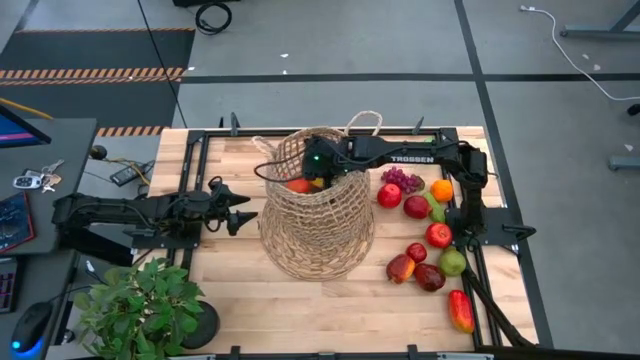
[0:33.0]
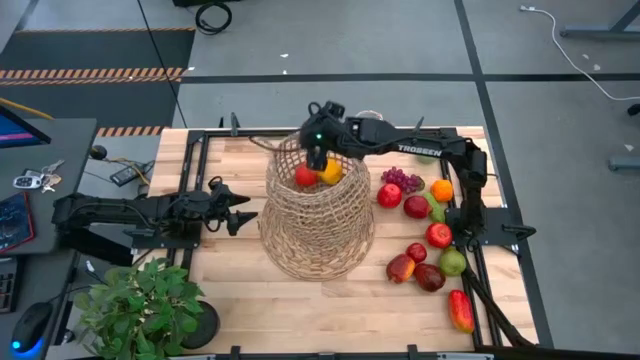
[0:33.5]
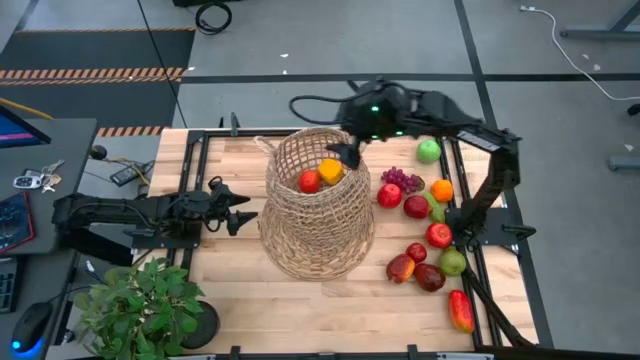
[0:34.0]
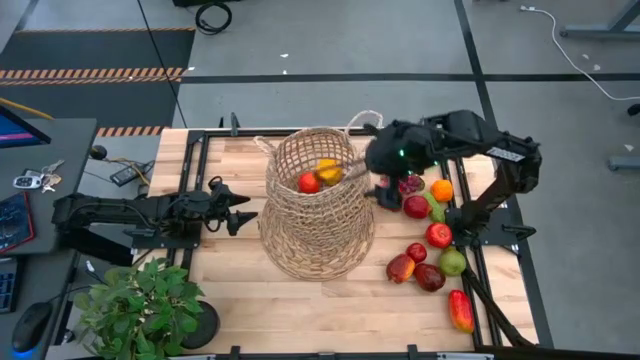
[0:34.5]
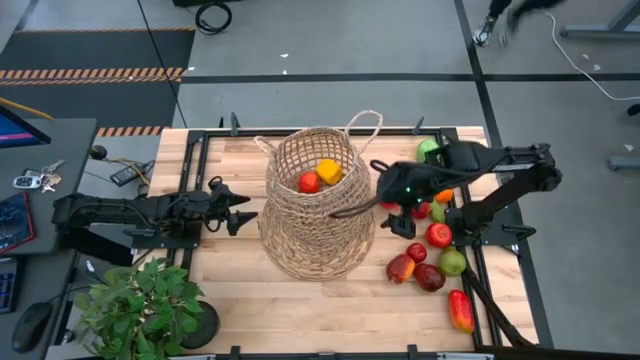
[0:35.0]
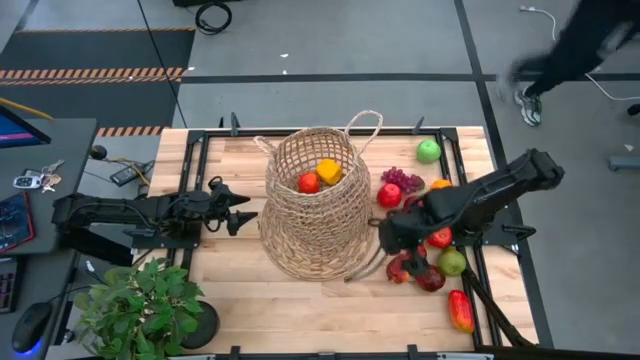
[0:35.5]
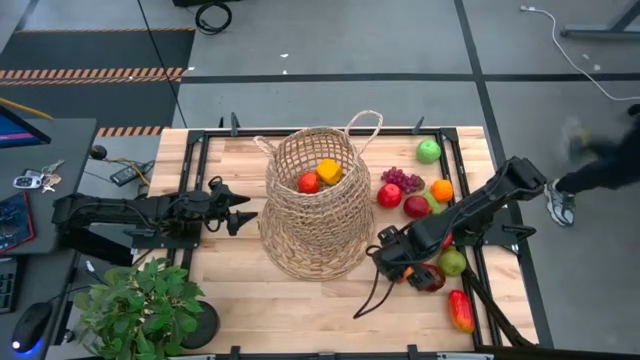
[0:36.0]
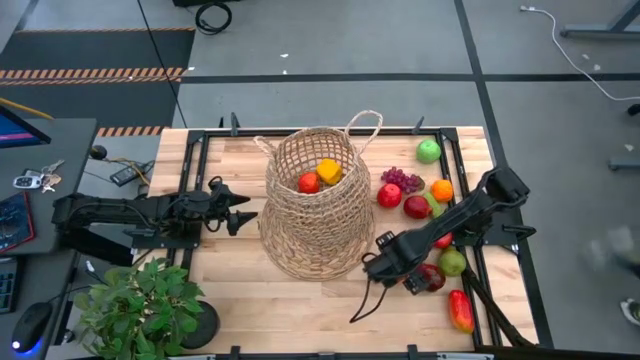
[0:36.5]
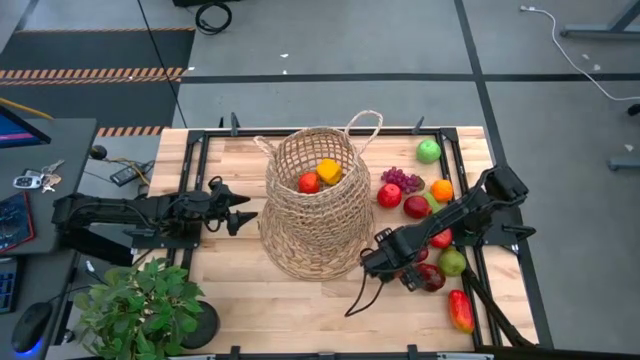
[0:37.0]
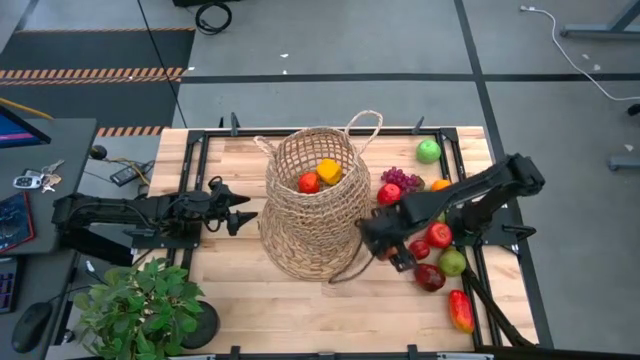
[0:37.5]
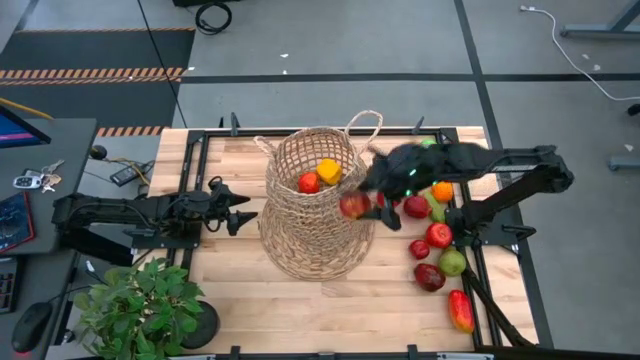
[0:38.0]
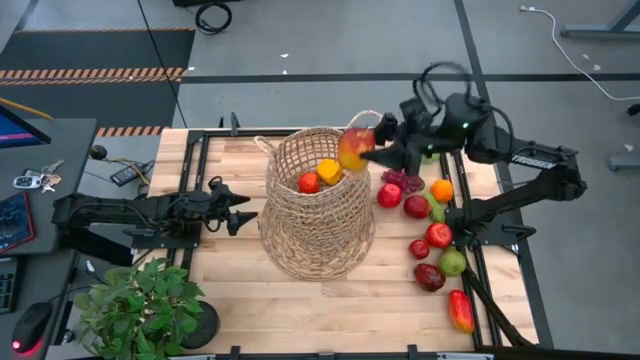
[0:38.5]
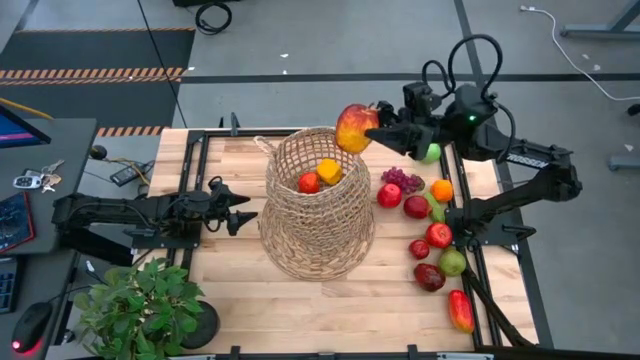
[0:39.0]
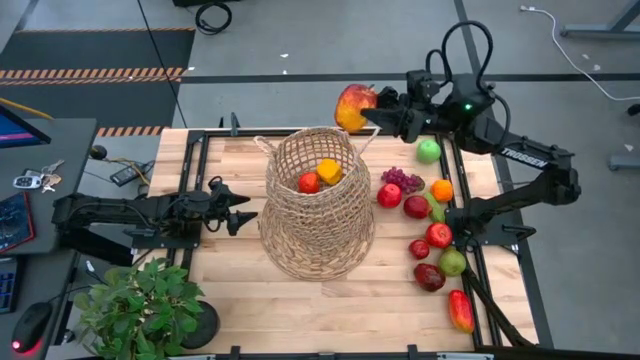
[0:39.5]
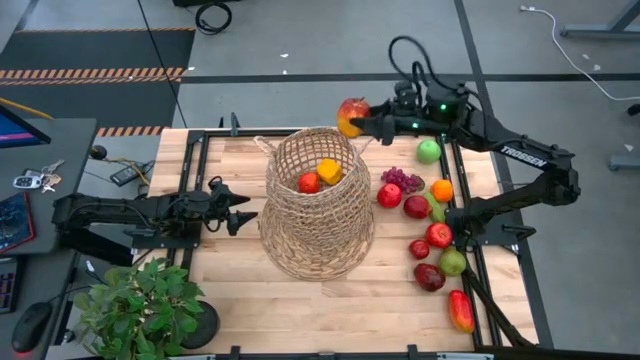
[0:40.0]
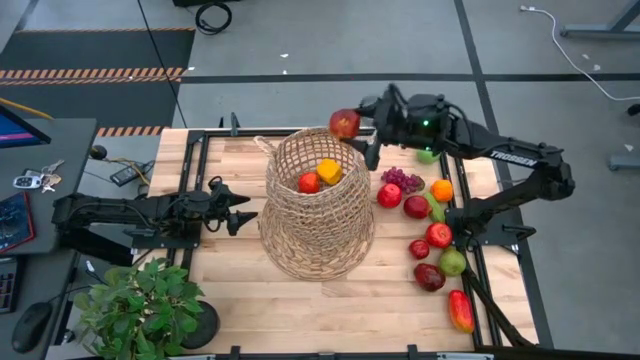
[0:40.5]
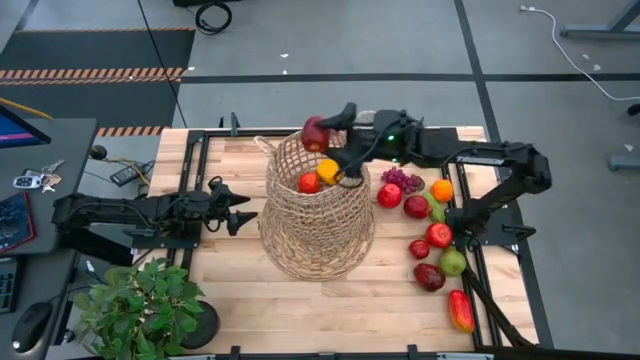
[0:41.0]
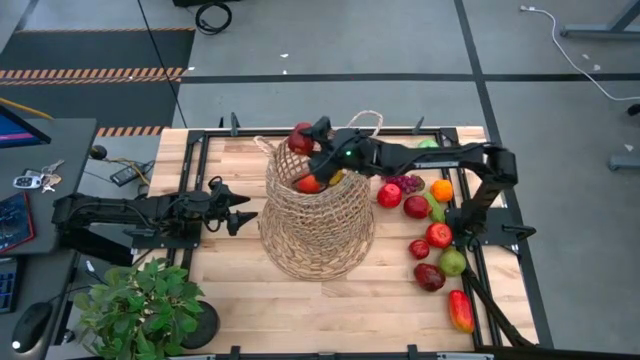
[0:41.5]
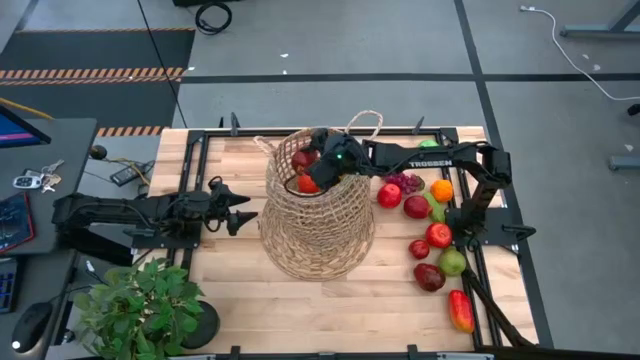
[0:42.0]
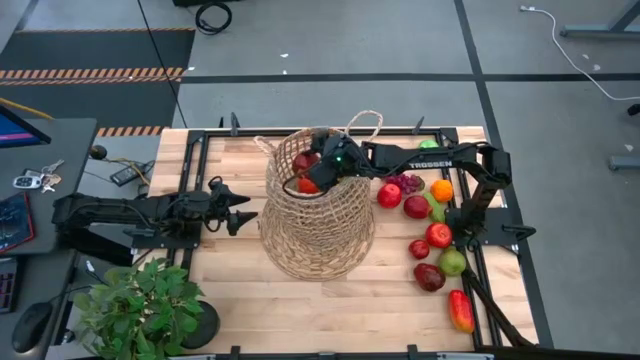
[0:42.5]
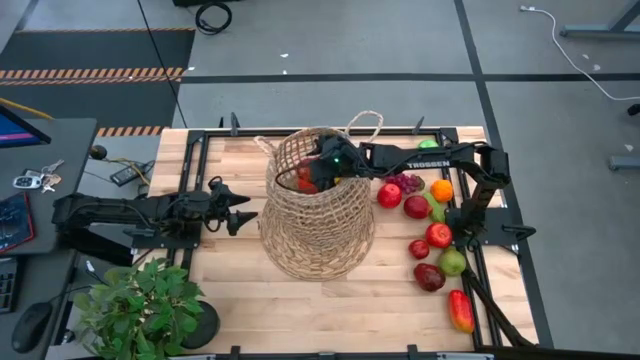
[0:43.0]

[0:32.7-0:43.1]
Task: Build produce basket
Put the red apple into the brown basket

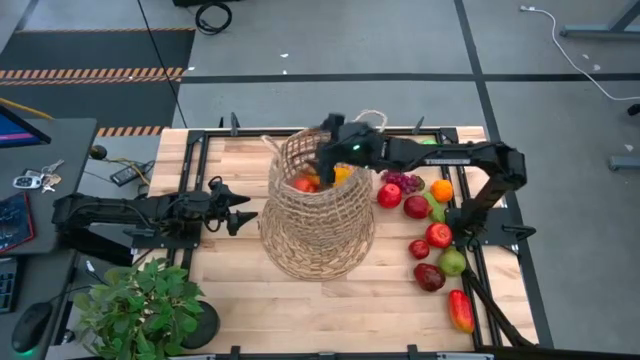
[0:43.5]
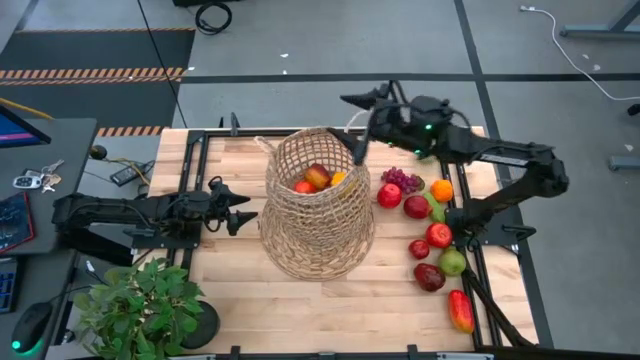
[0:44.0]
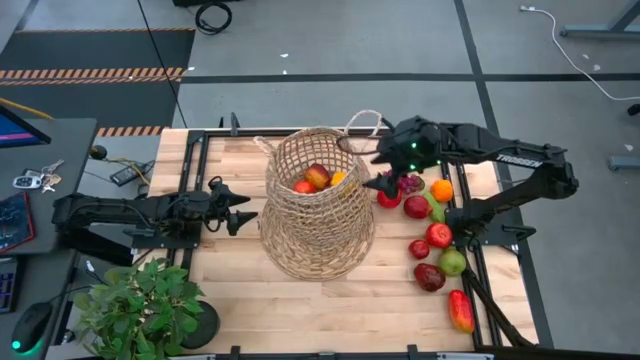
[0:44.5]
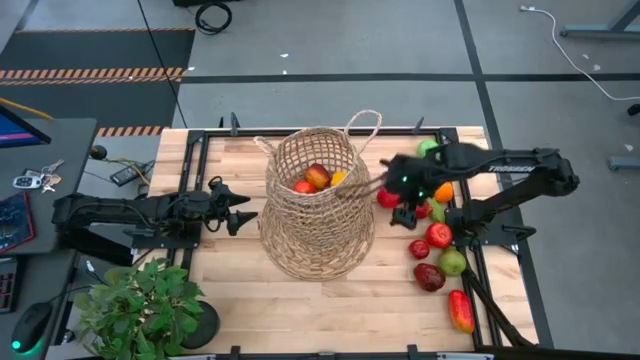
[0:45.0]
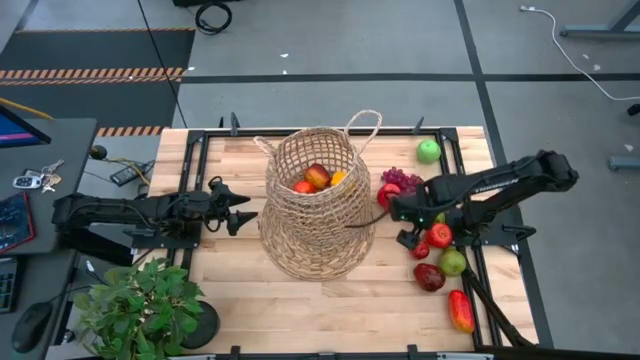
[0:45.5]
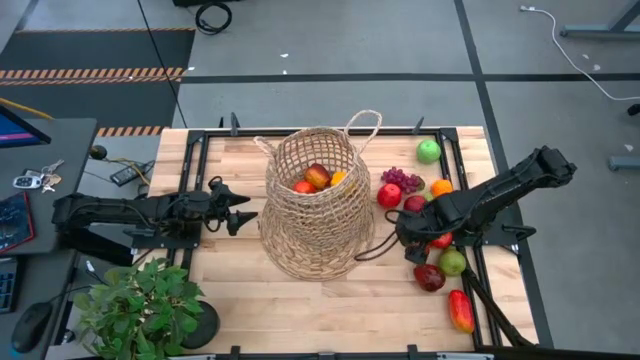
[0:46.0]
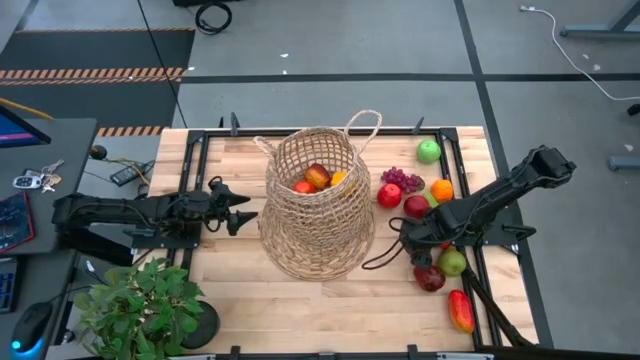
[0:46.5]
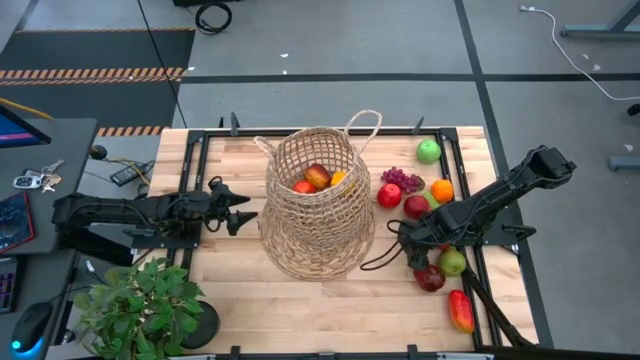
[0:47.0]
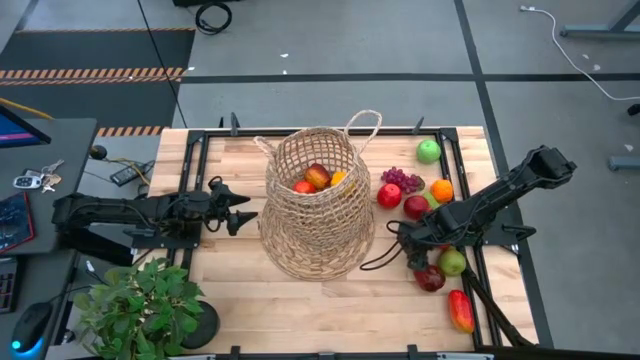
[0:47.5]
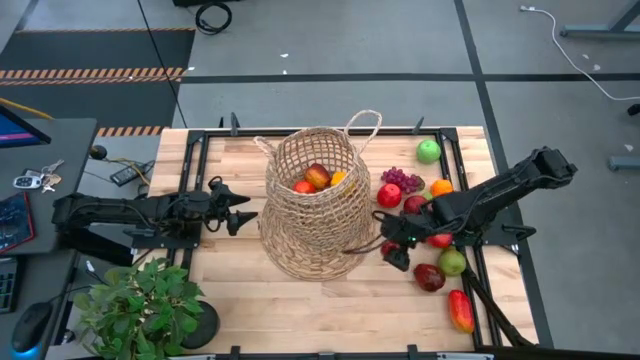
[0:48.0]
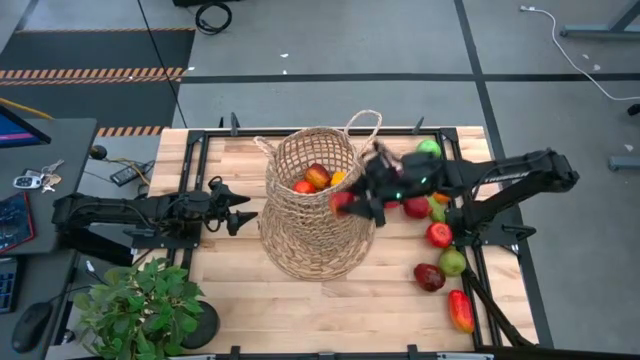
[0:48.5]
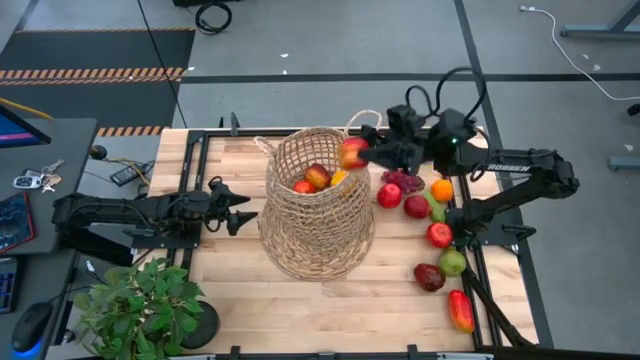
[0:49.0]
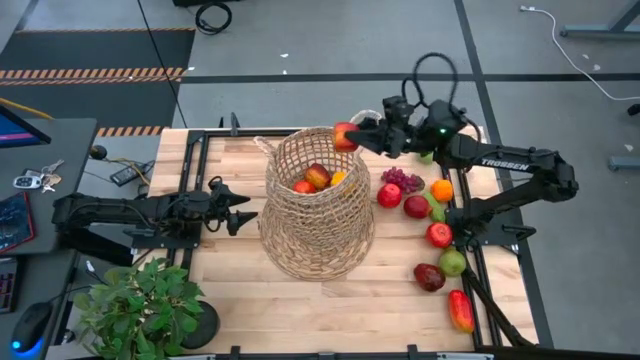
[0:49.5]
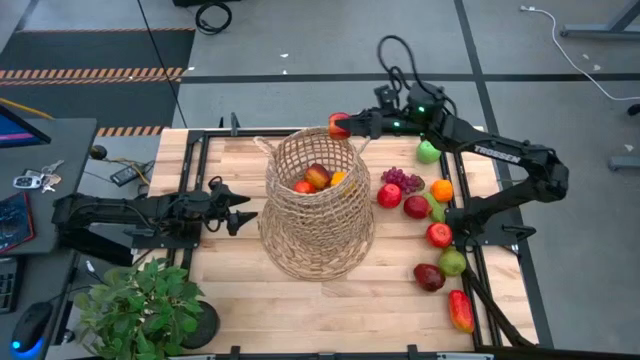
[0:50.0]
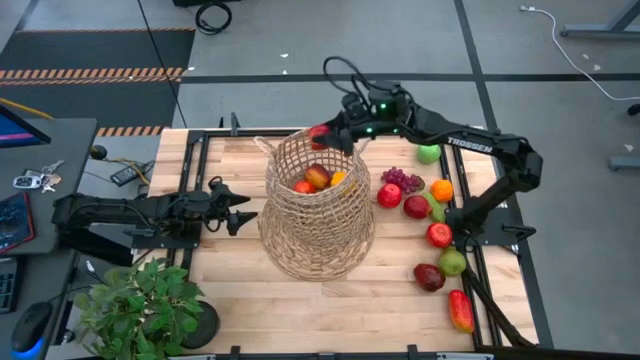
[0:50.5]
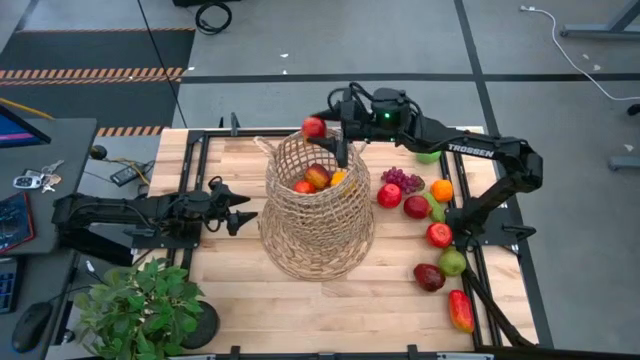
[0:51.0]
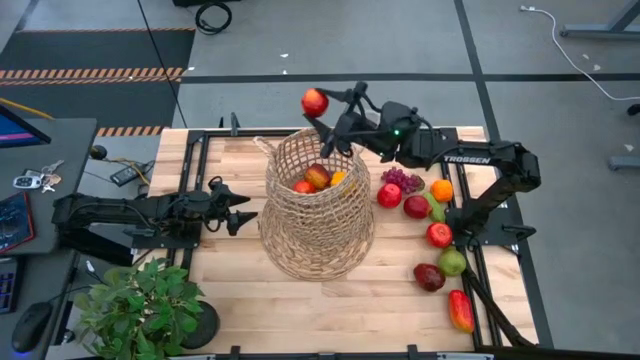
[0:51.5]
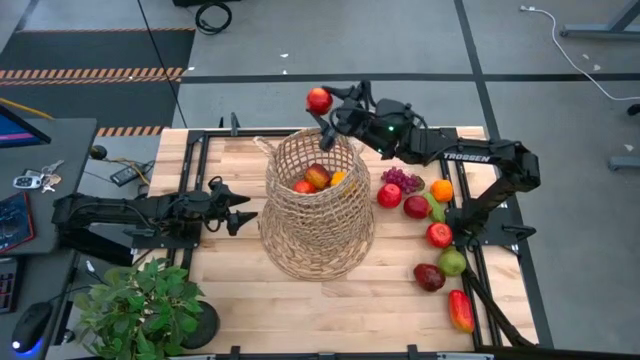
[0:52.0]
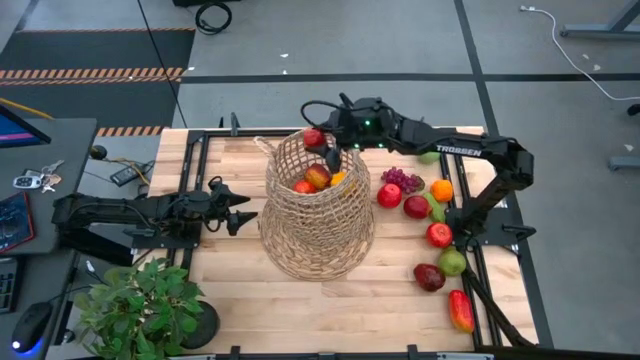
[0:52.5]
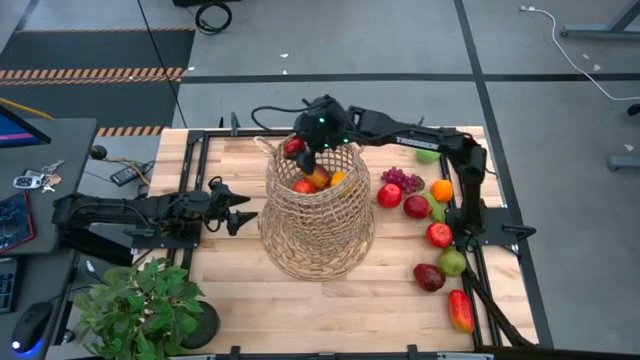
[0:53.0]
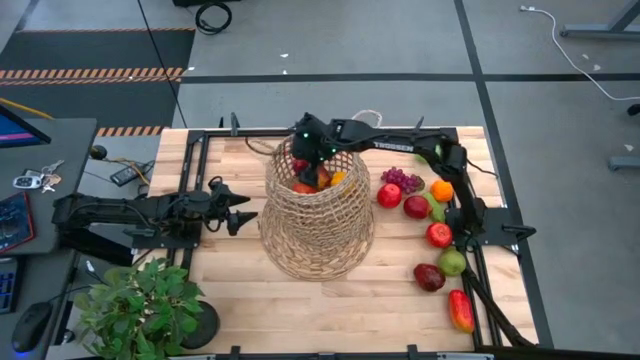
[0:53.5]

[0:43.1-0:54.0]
Put the red apple into the brown basket
